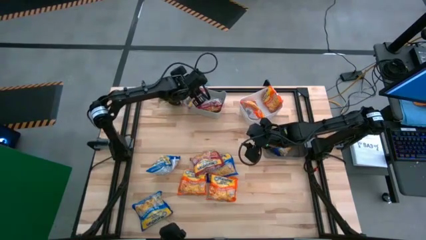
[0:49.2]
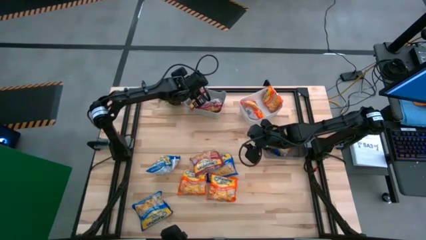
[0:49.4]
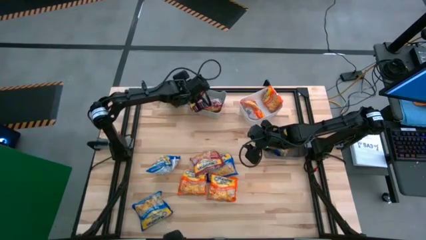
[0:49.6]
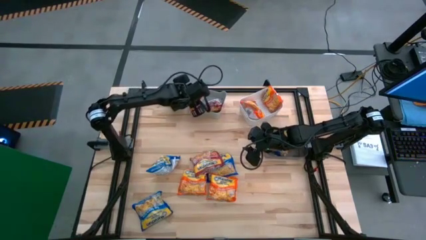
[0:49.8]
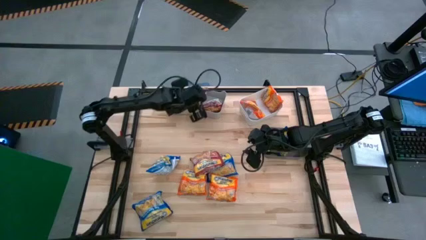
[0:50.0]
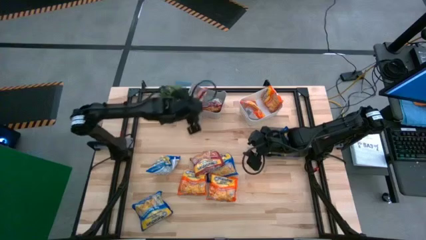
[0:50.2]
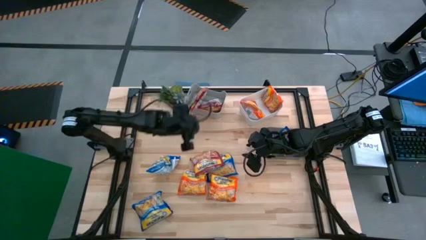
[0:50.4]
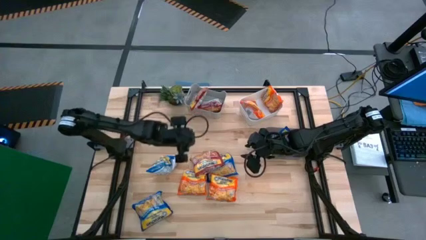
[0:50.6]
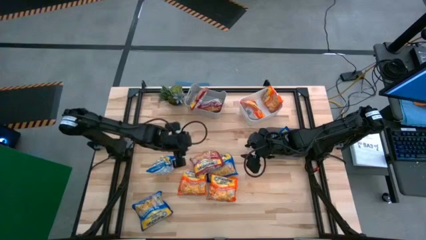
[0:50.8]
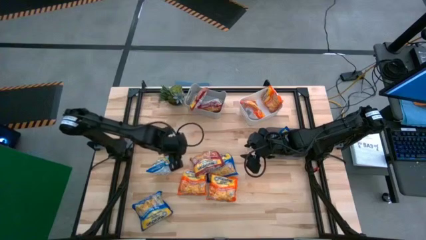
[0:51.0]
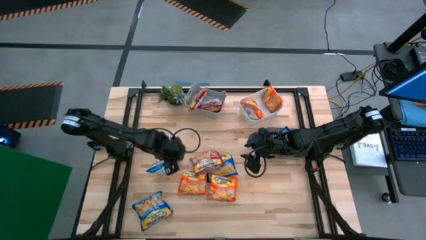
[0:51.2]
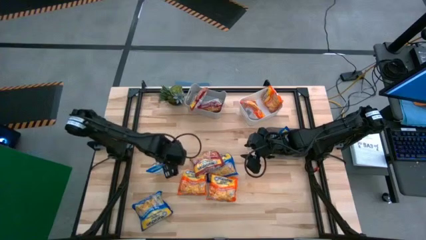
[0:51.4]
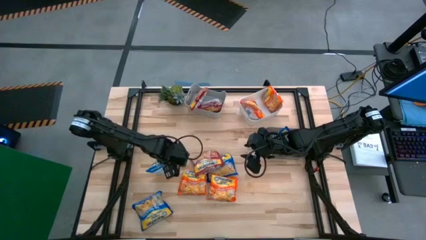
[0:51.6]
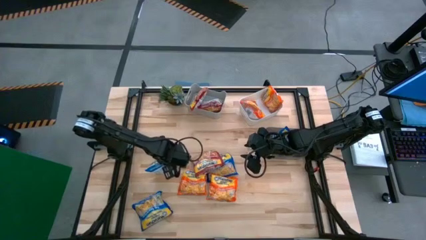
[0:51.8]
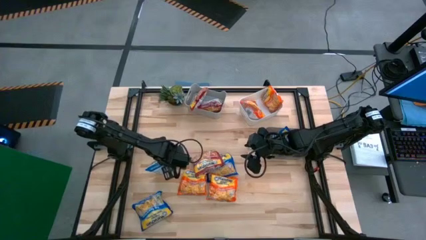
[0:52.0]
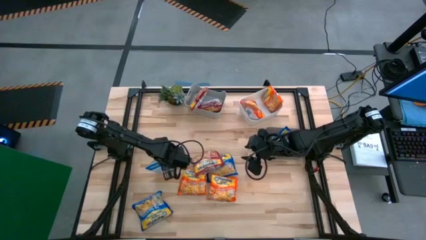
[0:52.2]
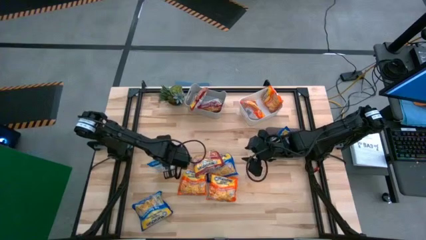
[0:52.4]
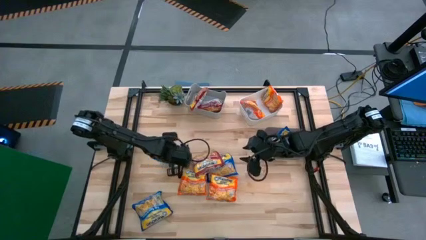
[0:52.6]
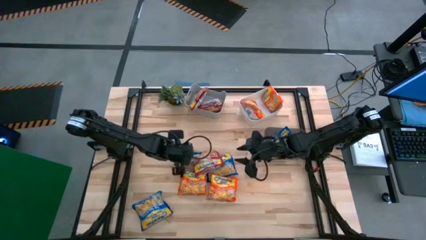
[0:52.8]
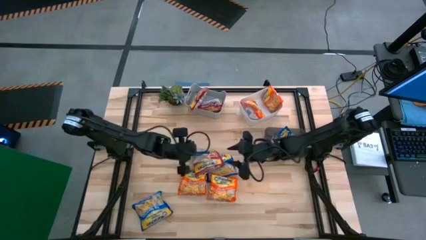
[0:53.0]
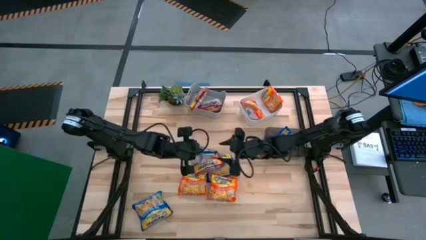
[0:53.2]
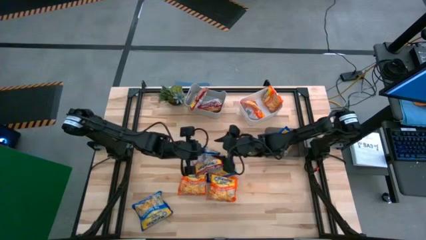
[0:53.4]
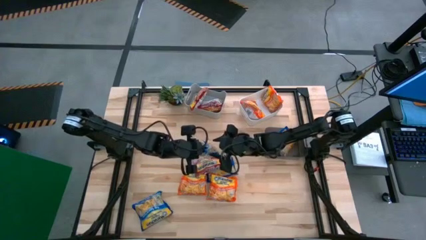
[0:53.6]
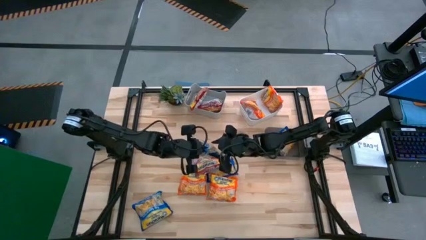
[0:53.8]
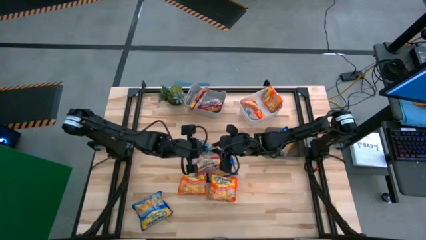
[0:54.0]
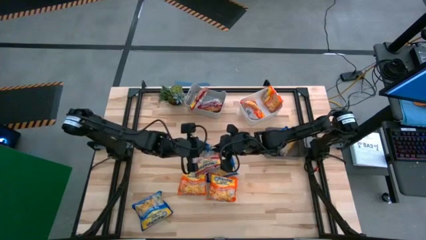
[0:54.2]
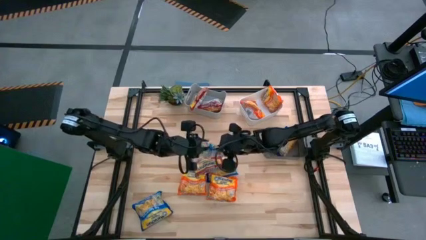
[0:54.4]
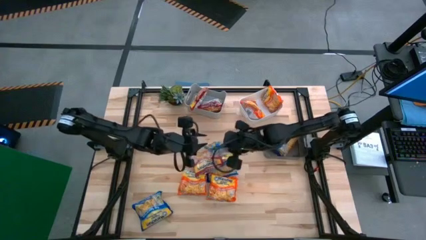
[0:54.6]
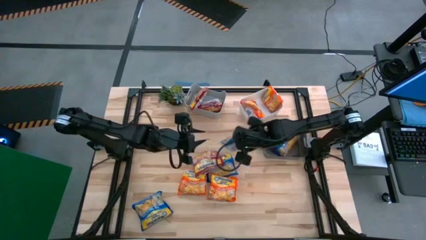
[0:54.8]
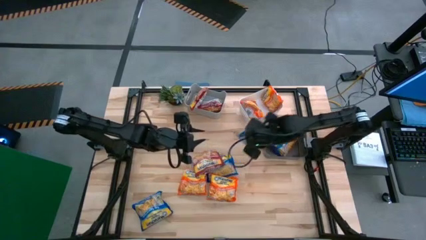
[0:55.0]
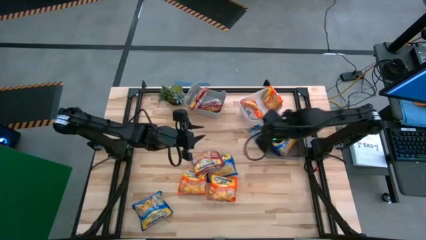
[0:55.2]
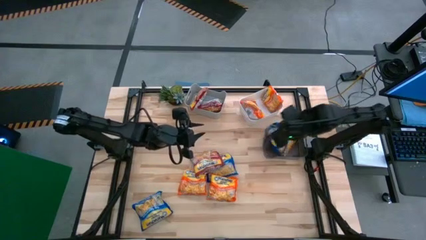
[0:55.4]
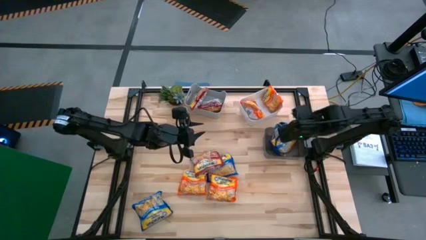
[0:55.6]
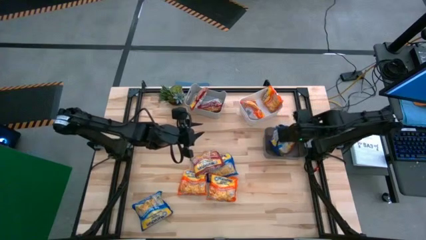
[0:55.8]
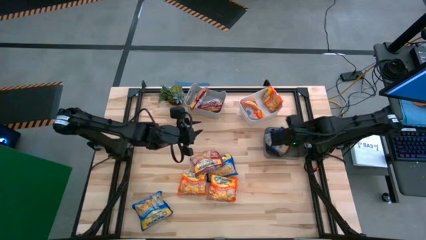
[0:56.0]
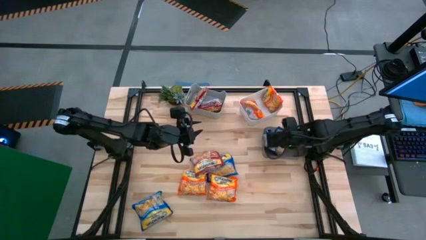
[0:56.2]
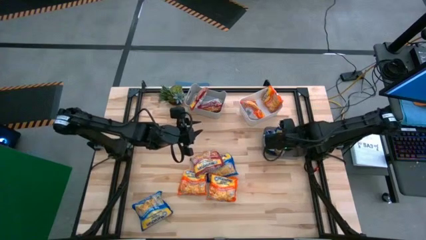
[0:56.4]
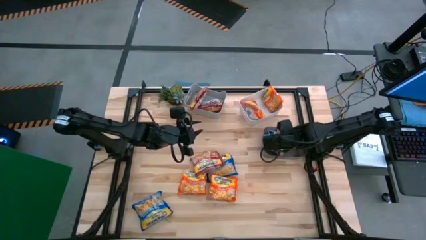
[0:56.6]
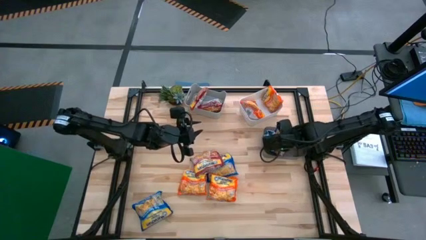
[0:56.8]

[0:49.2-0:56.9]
Task: Sort Maruchan noodles
Put the blue noodle pack into the black bin

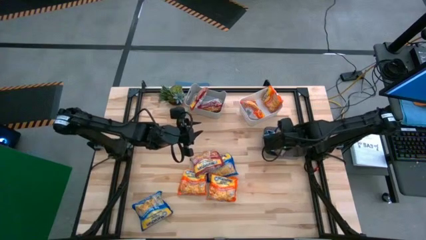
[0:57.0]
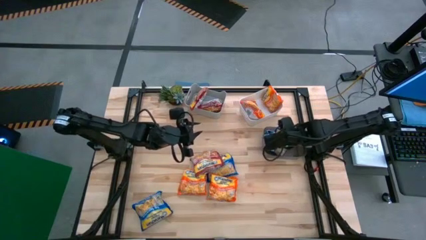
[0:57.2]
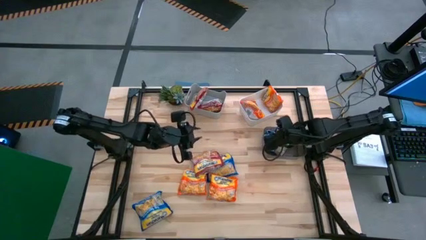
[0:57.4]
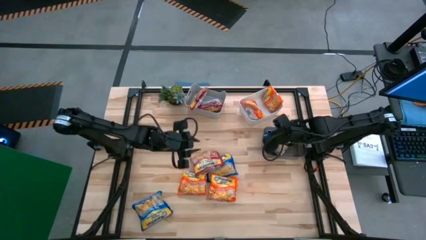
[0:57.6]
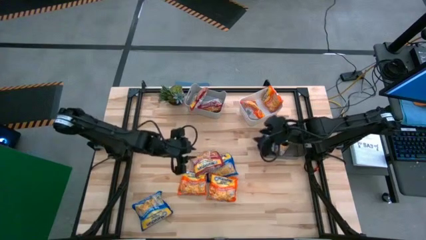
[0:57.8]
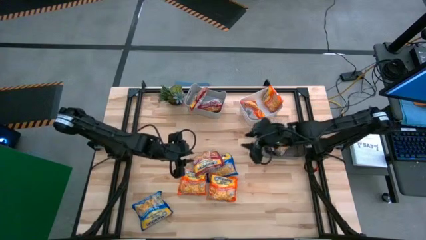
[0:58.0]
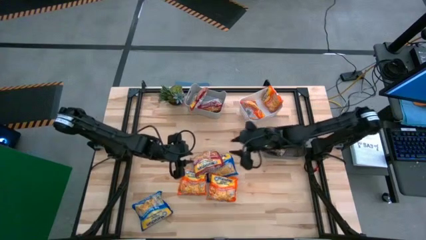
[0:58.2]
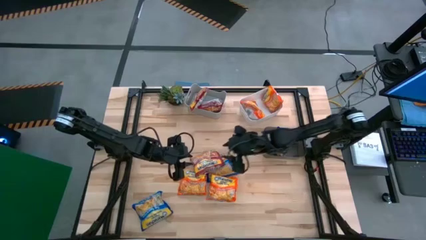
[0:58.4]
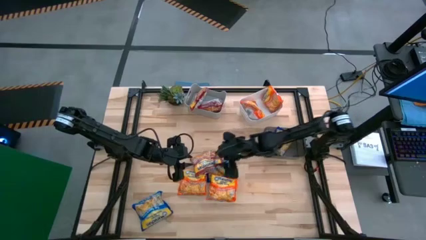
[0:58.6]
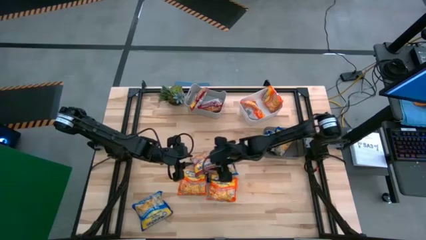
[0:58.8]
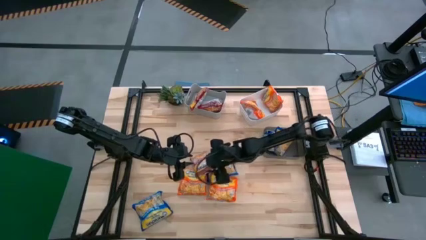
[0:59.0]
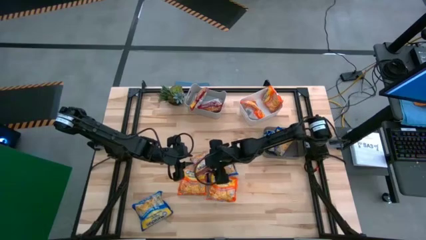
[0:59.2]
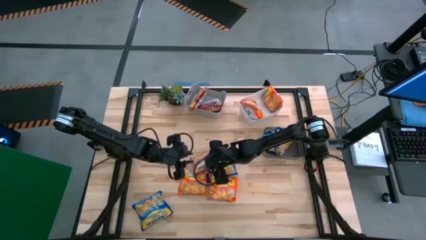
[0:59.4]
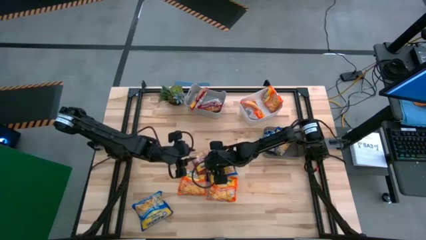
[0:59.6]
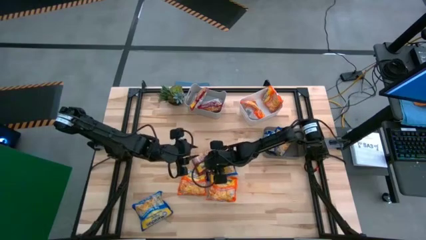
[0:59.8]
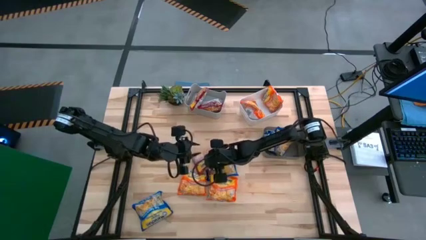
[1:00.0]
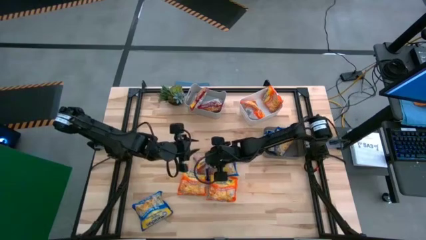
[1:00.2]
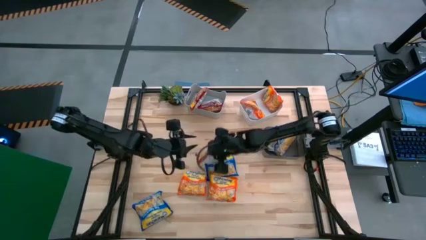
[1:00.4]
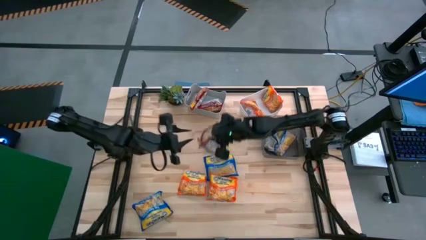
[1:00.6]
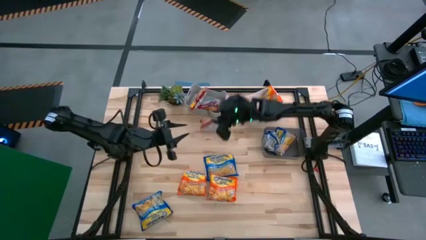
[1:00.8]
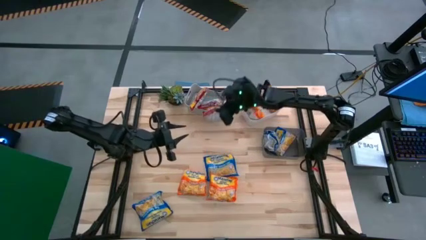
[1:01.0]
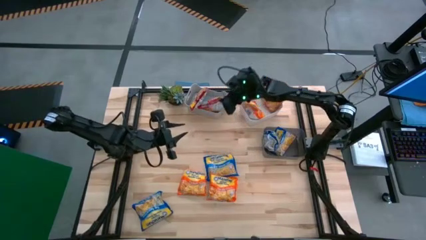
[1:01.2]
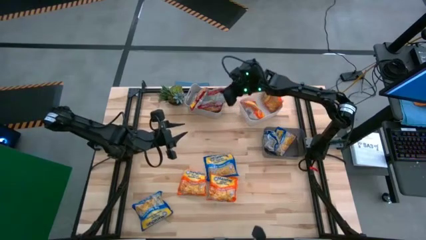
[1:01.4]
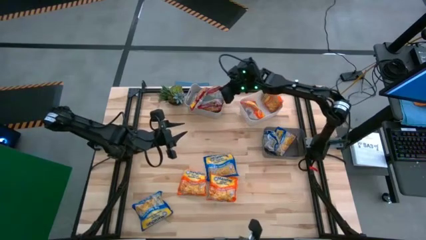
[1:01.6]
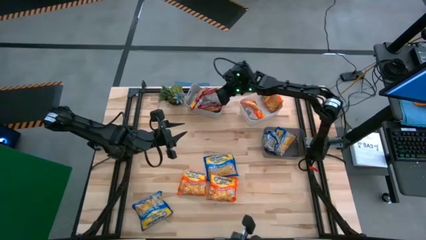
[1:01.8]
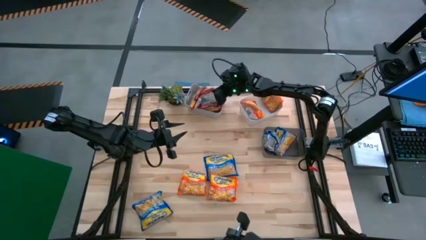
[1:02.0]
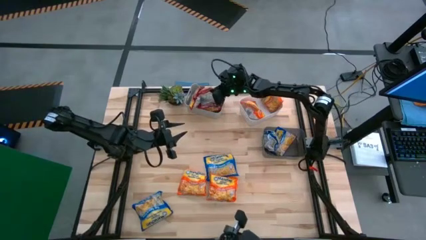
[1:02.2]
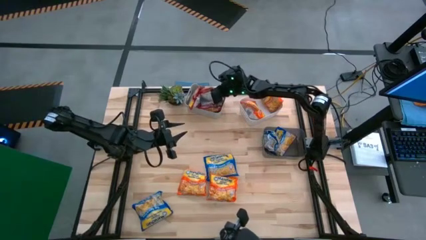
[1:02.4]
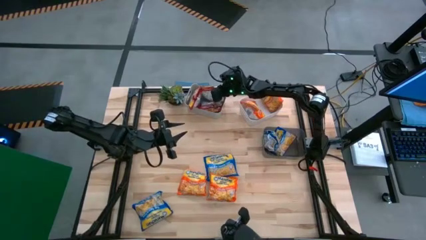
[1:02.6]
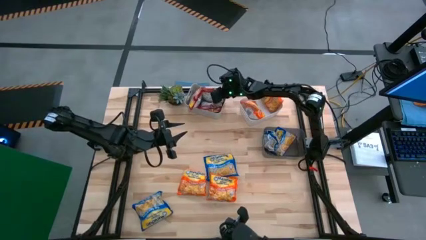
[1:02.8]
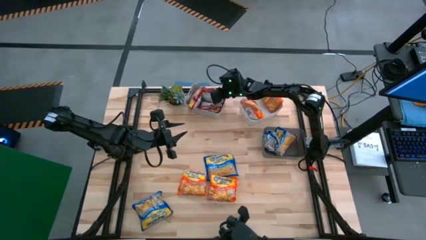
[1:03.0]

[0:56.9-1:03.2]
Put the red noodle pack into the gray bin

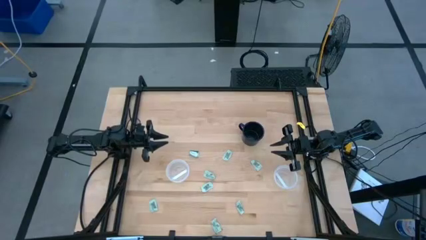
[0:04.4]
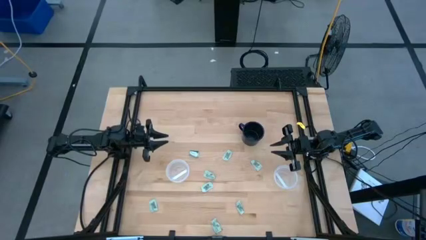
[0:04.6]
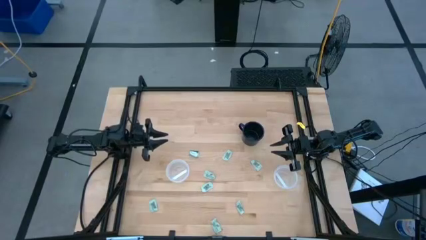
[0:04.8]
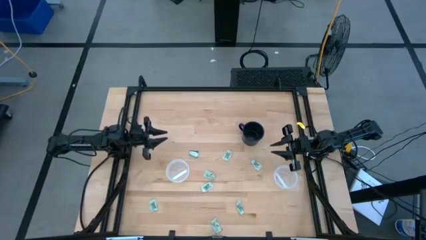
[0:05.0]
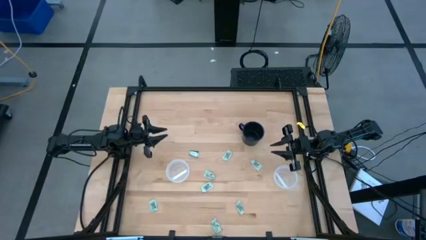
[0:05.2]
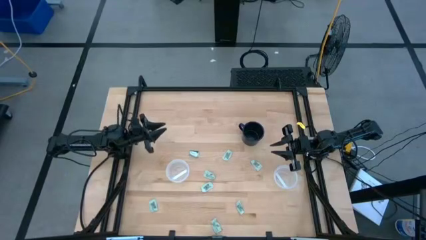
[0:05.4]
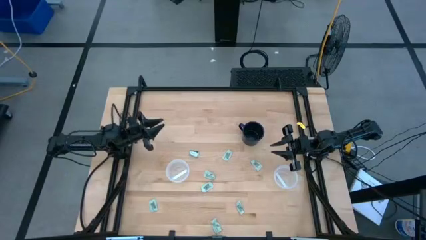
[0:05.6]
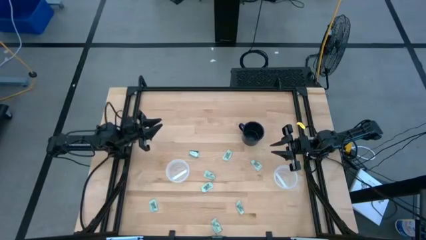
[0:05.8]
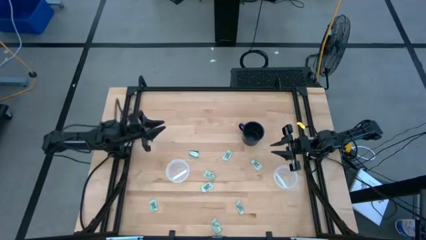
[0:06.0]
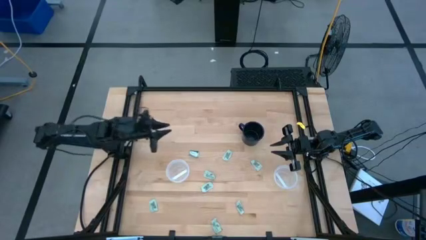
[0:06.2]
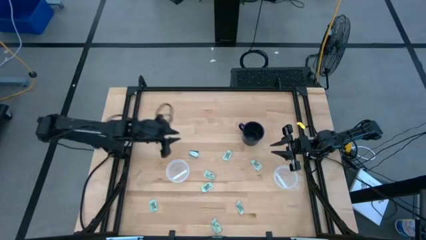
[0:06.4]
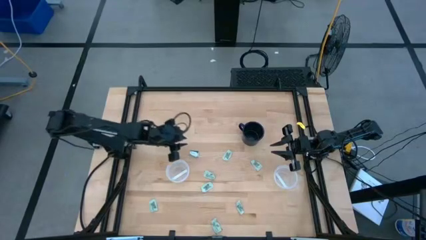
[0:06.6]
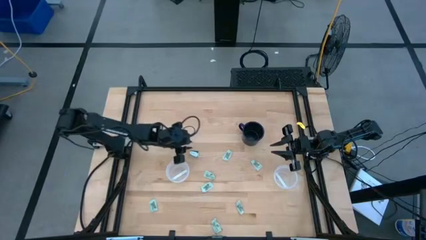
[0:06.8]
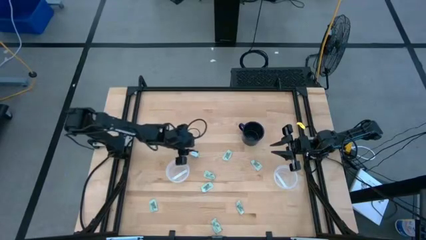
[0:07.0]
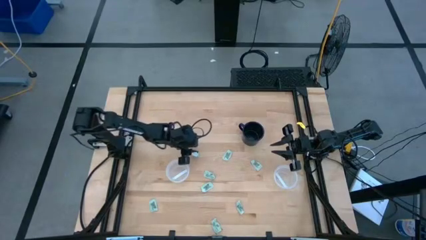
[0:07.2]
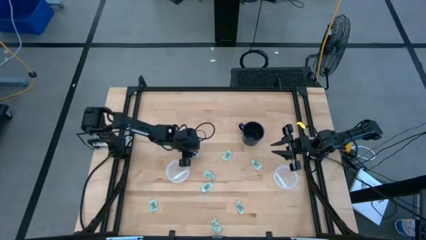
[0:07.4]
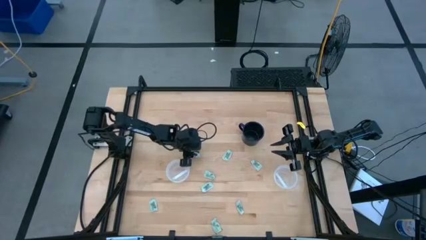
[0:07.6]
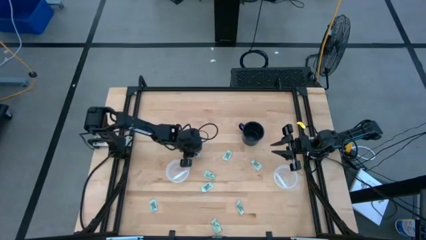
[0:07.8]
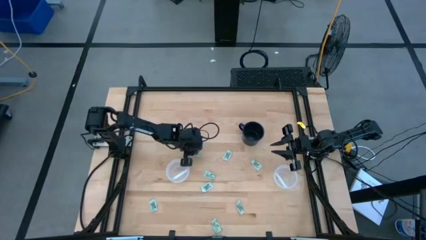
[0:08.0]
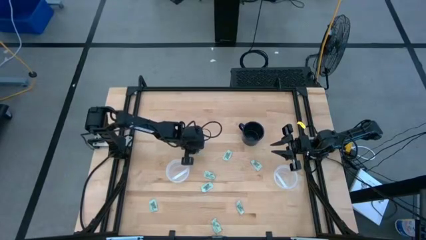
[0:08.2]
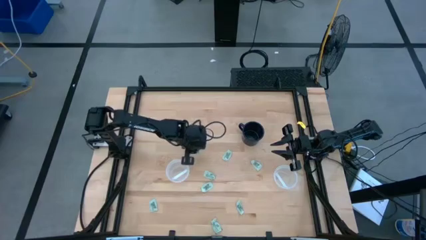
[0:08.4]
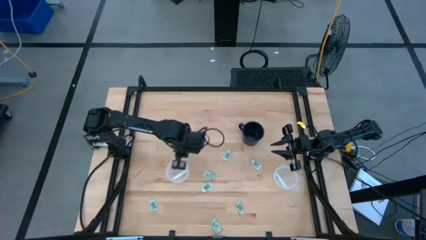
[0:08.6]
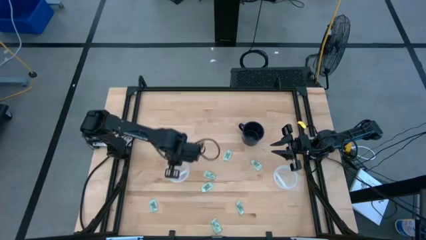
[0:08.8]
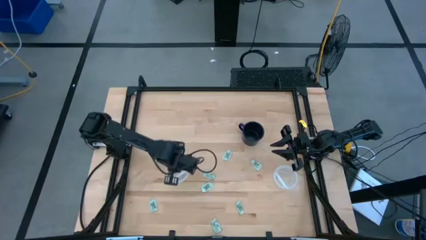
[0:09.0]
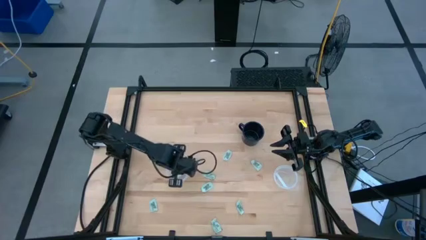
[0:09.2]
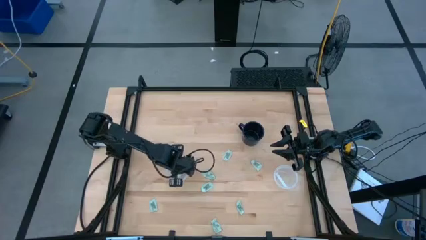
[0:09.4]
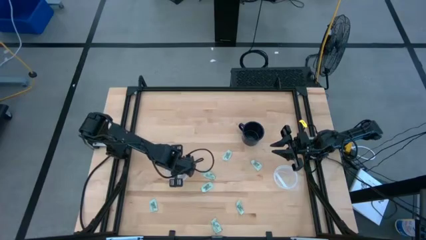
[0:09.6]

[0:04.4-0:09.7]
Task: Pick and place Stevia / Truvia into bins
Put the stevia packet into the left transparent plastic container
